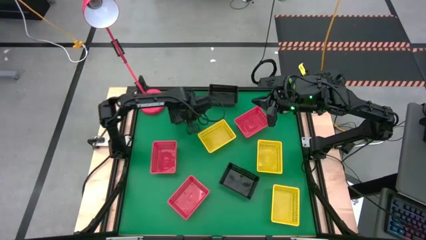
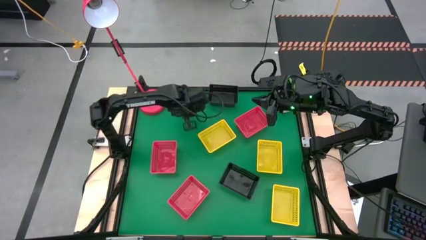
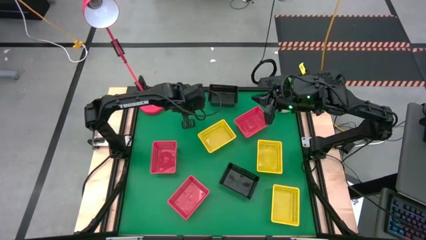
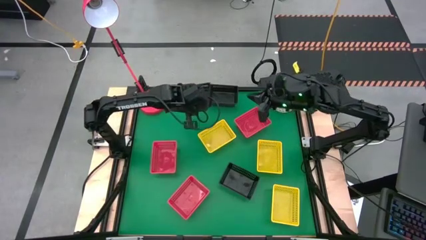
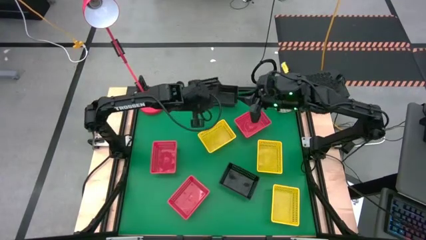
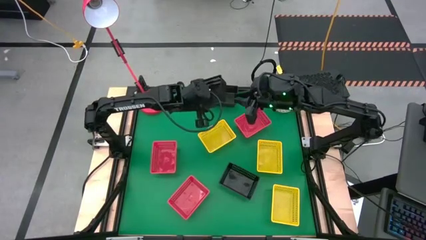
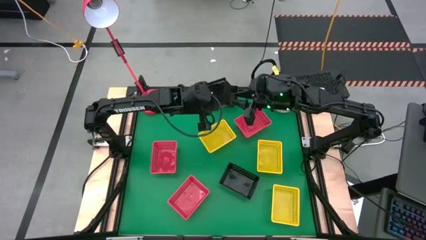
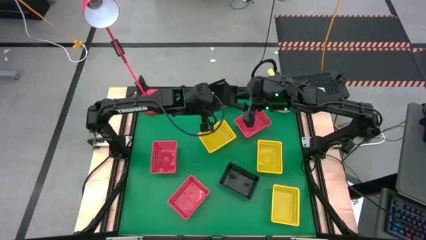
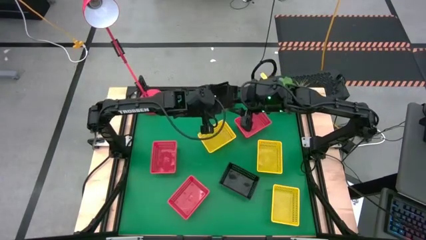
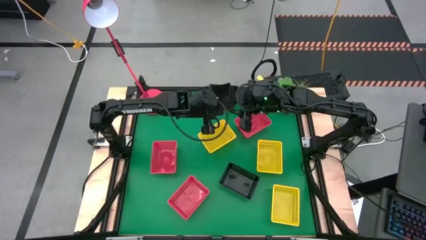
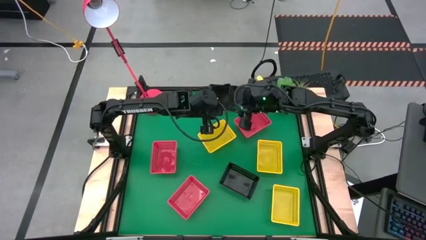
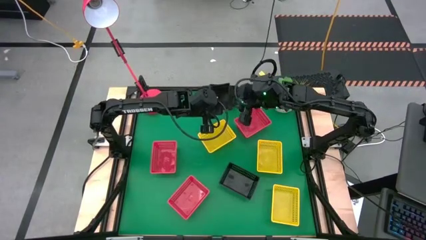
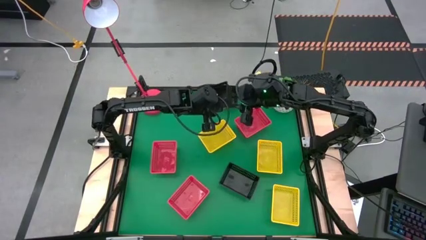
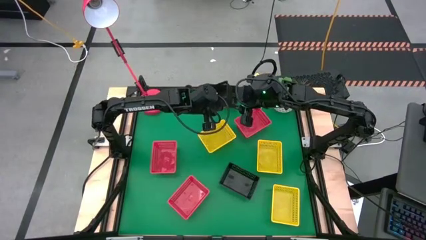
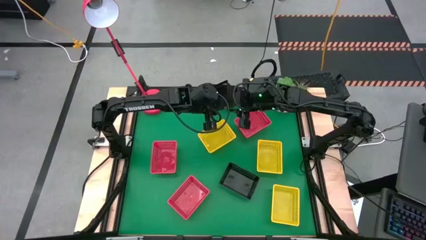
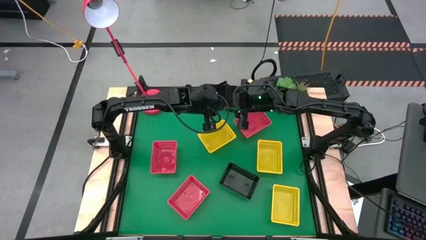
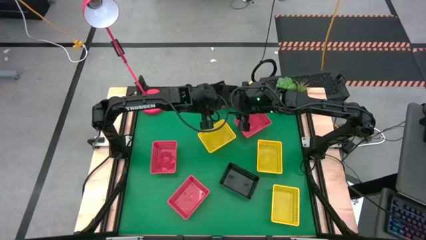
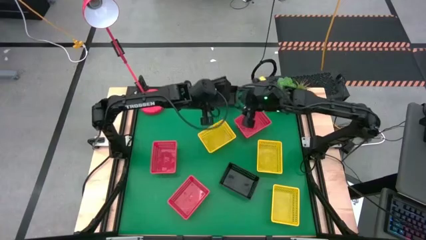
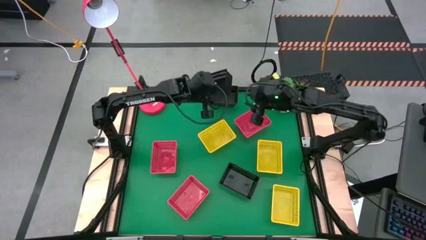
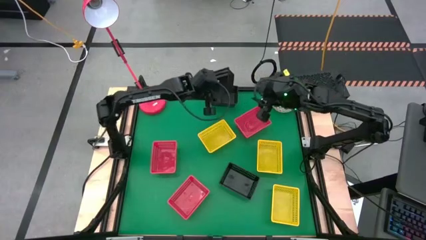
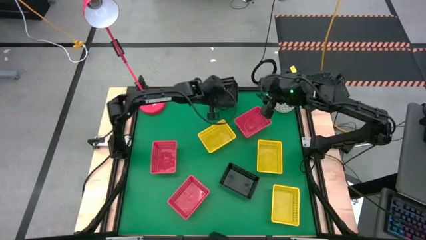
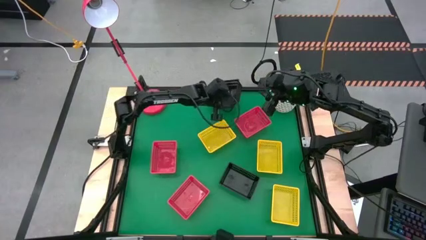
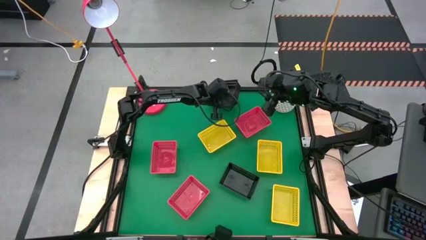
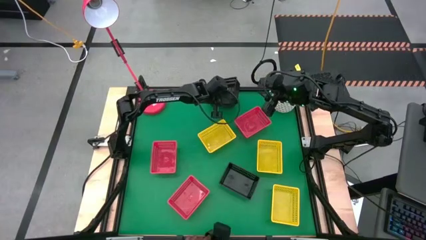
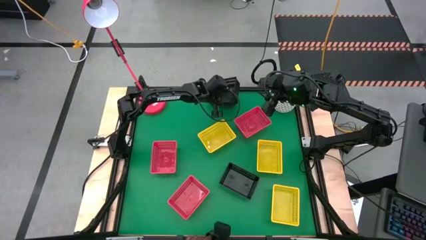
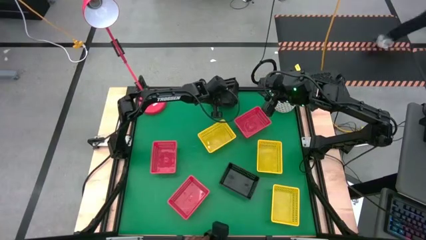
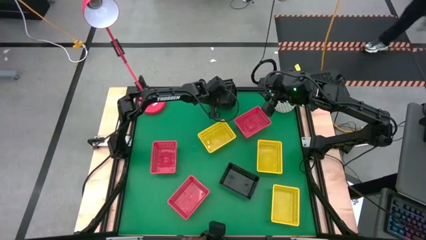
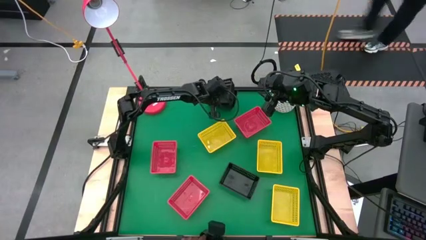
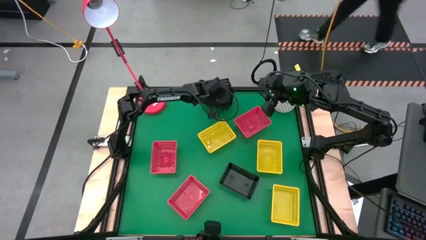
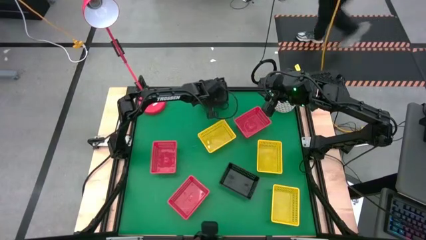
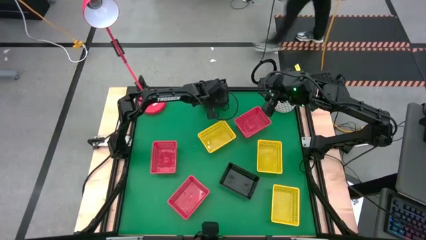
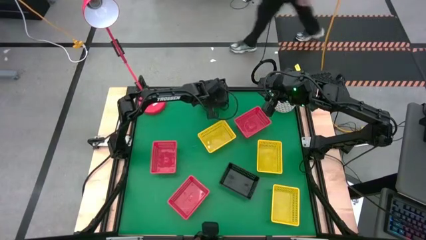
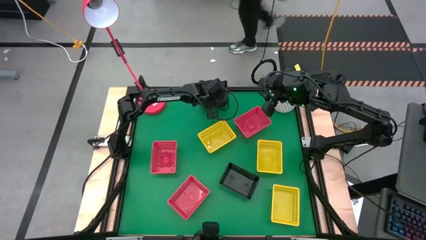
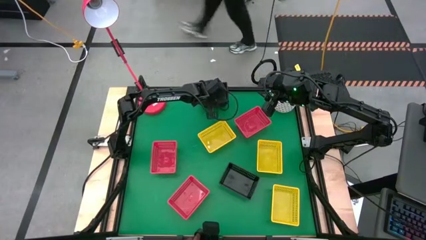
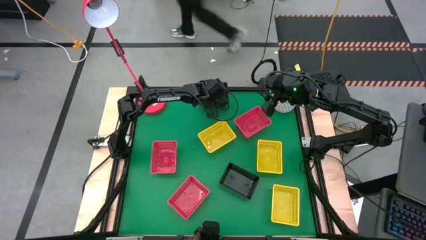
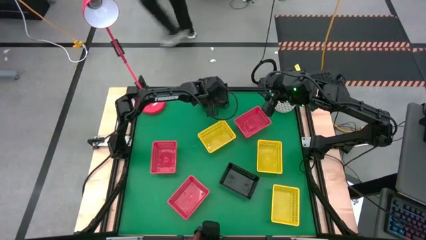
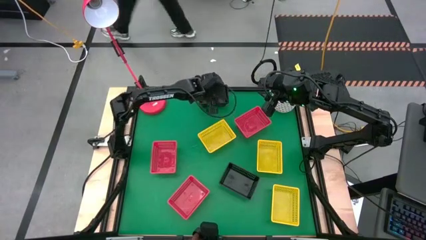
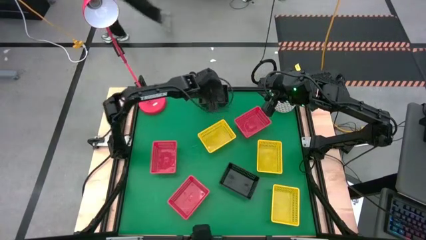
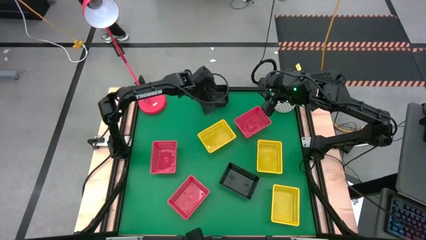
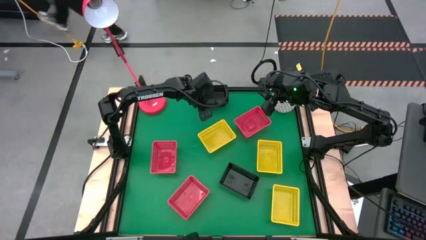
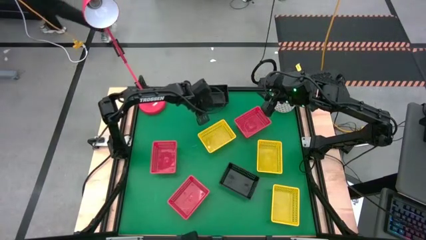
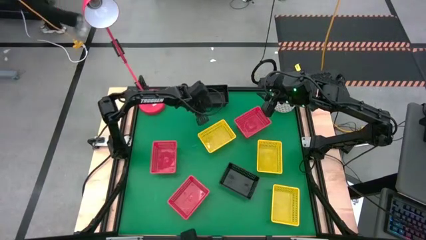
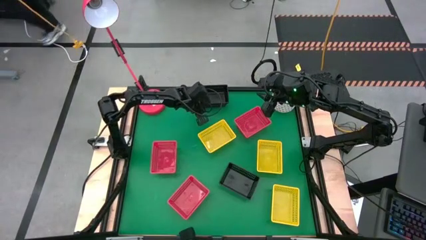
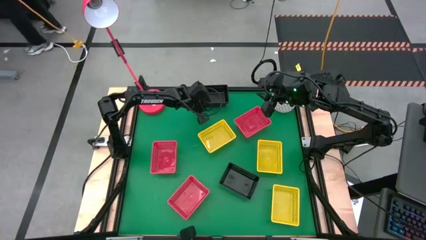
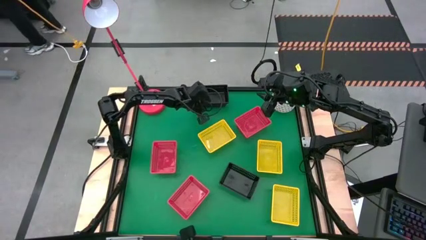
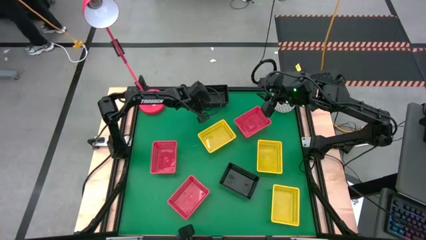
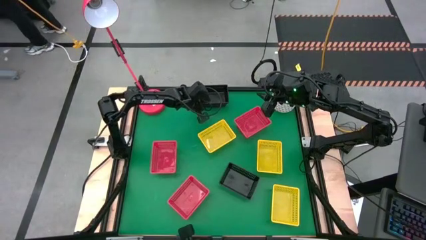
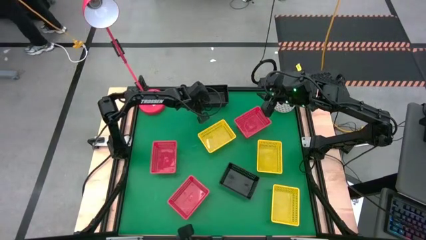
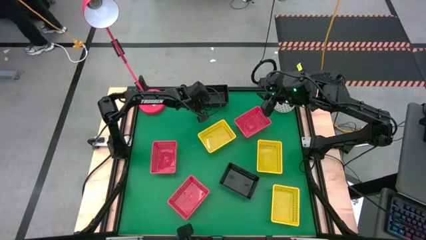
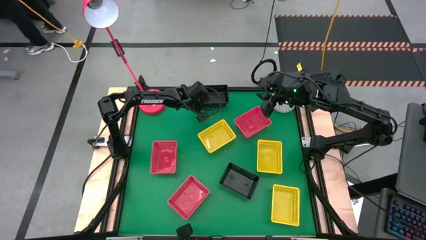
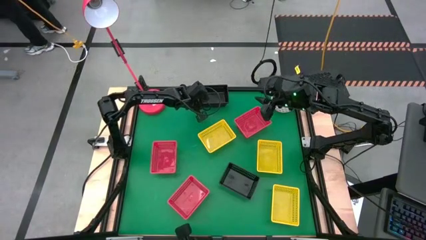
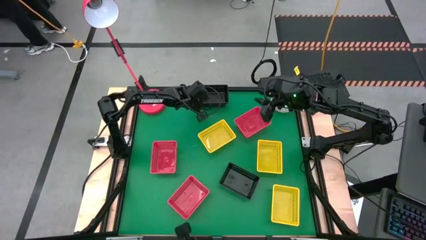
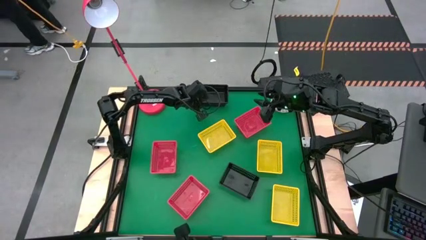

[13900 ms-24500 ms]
Stack the middle black bin on the top black bin

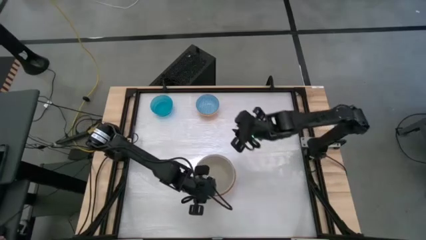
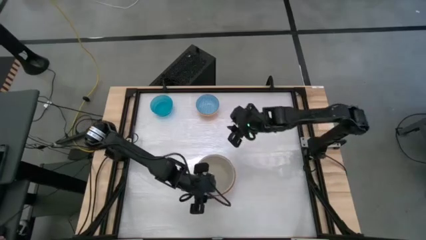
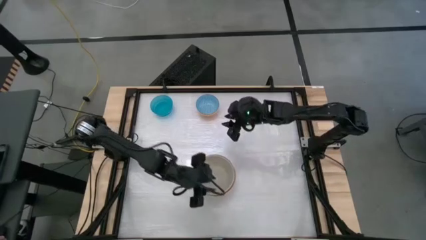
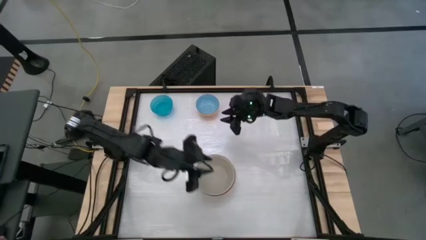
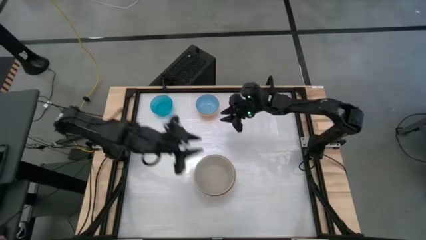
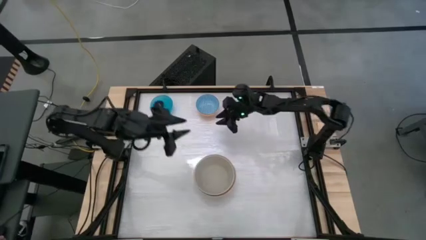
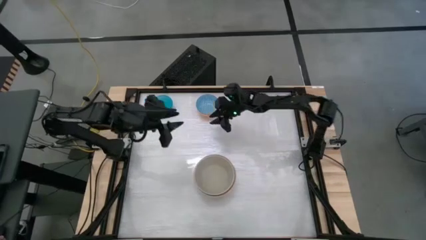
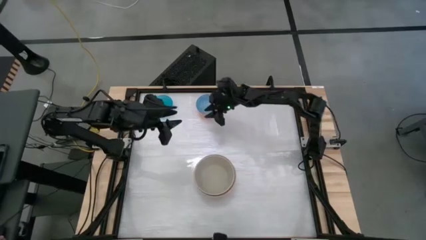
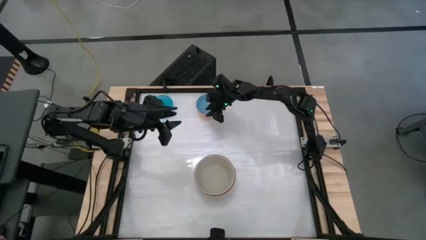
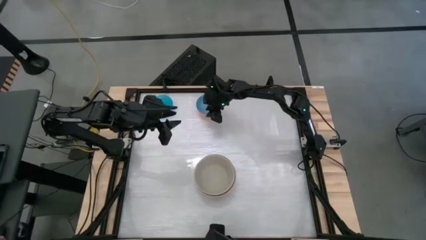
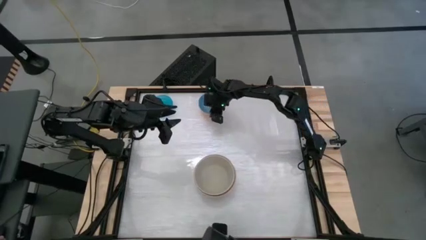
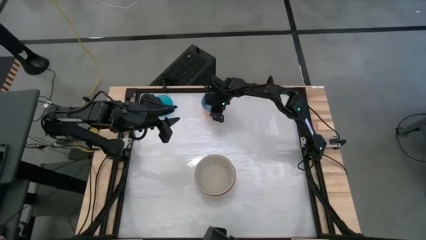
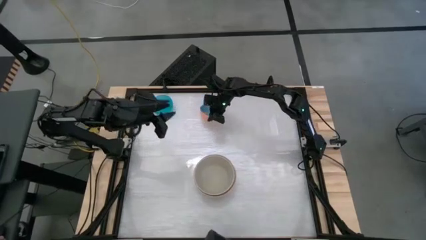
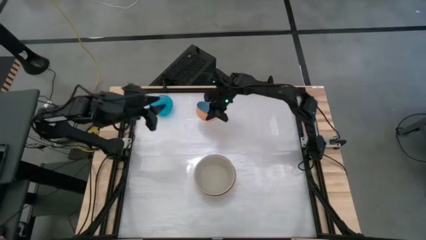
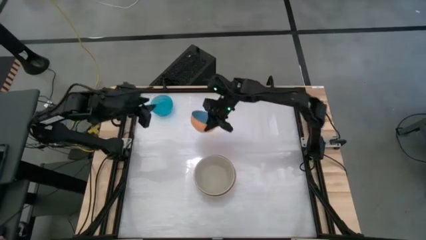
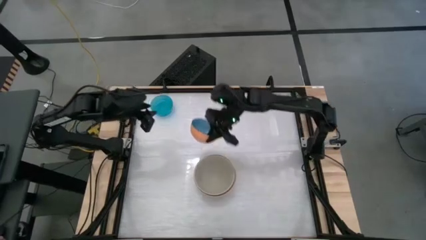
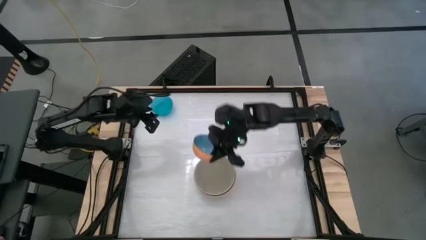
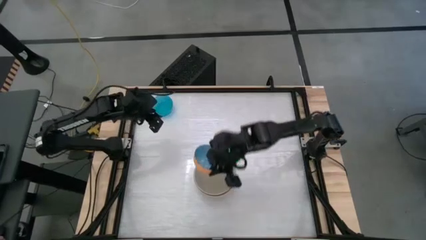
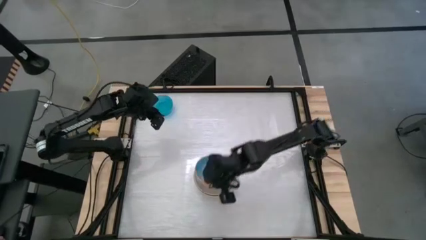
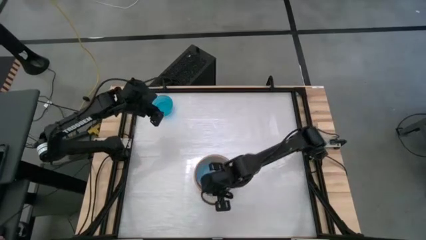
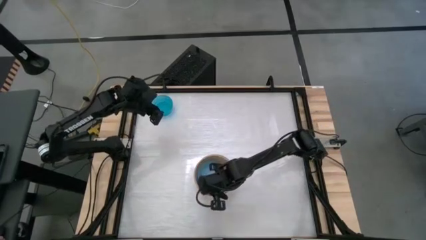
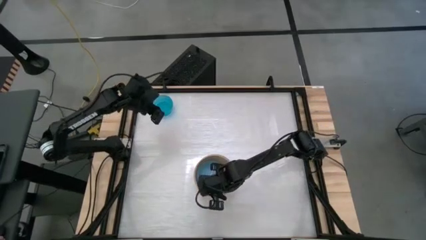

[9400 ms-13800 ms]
Stack the blue patterned bowl on top of the gray bowl
